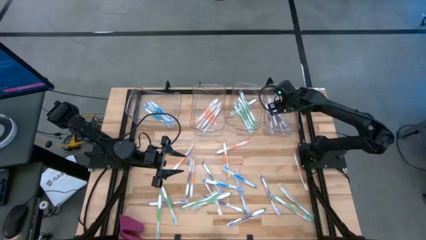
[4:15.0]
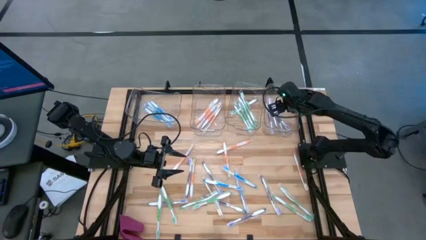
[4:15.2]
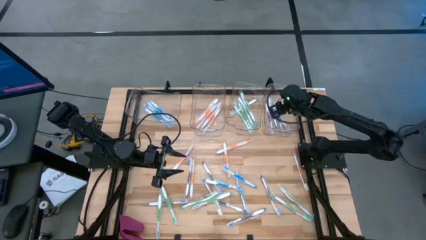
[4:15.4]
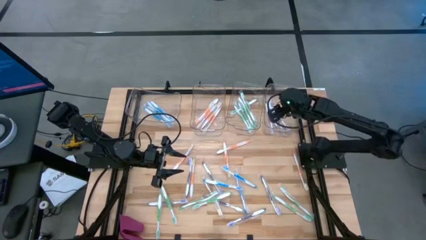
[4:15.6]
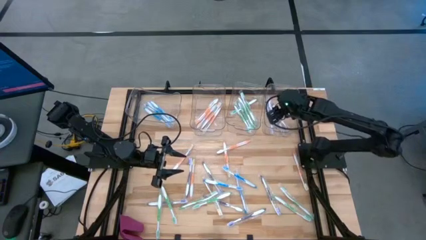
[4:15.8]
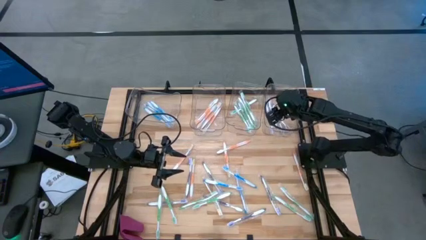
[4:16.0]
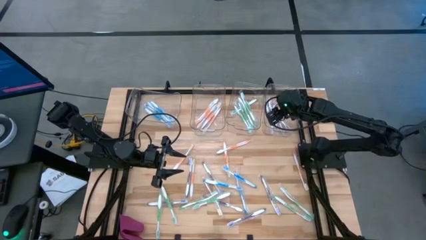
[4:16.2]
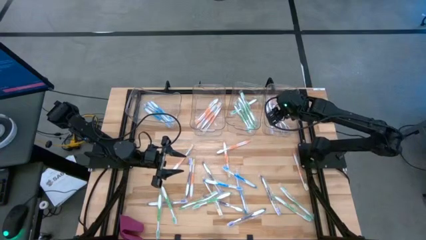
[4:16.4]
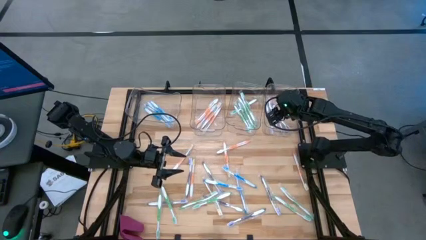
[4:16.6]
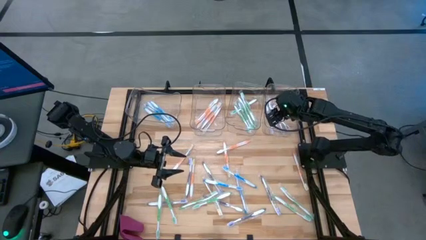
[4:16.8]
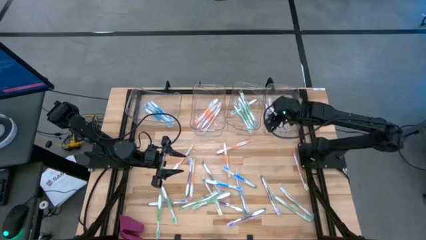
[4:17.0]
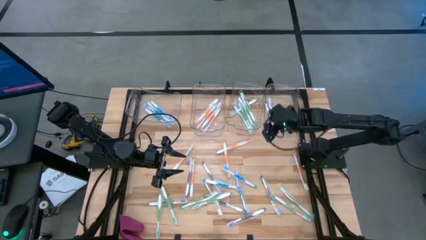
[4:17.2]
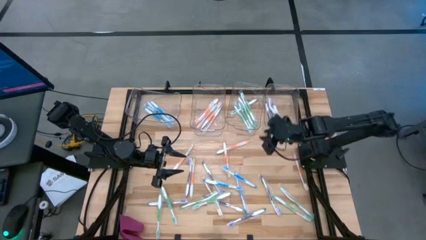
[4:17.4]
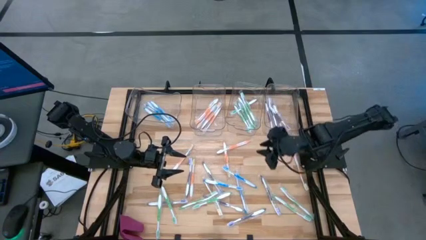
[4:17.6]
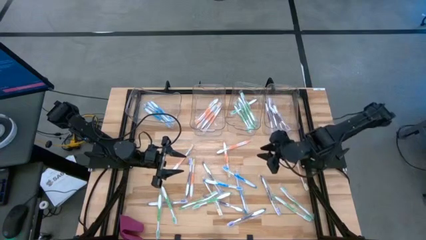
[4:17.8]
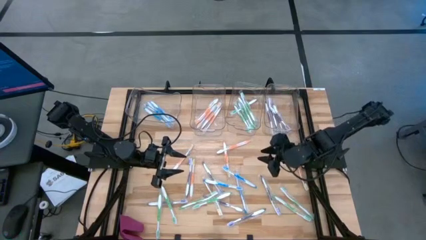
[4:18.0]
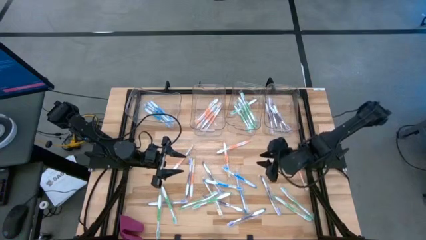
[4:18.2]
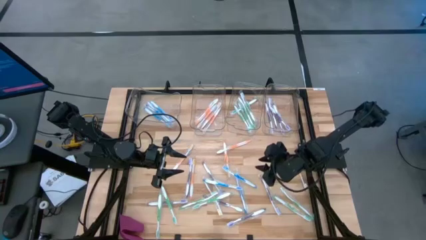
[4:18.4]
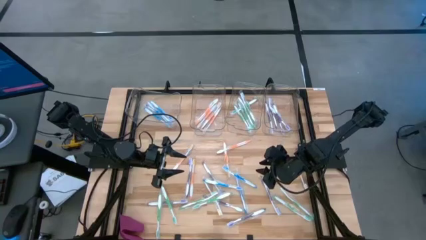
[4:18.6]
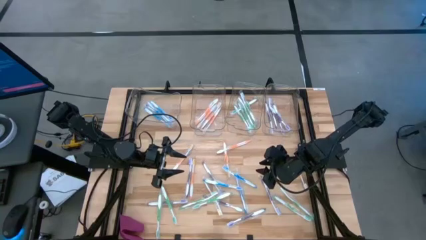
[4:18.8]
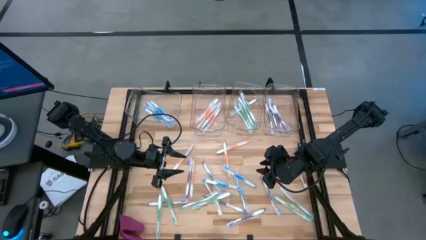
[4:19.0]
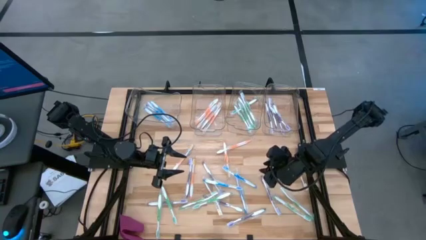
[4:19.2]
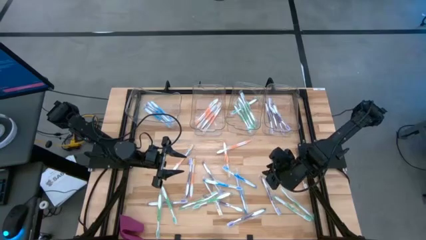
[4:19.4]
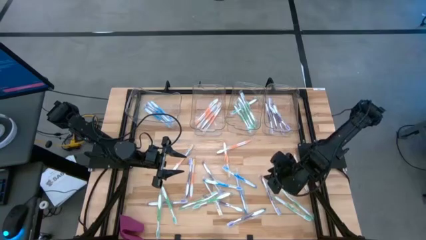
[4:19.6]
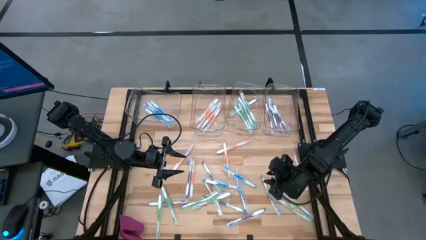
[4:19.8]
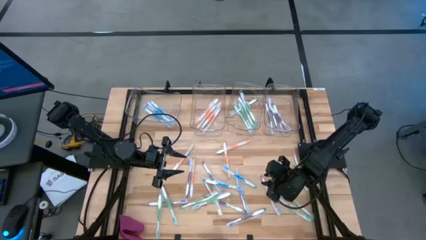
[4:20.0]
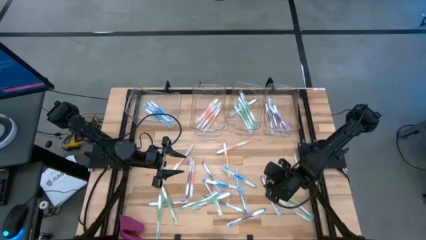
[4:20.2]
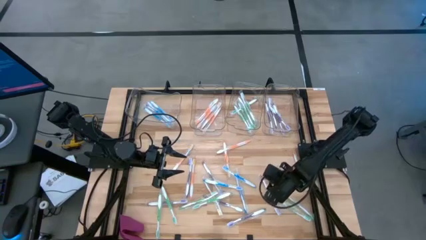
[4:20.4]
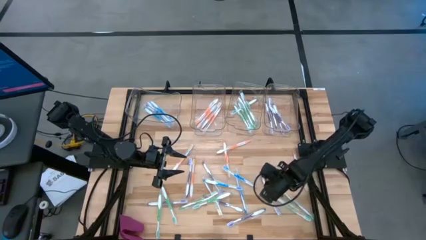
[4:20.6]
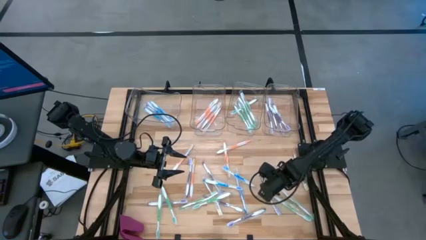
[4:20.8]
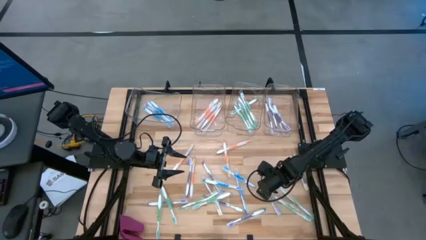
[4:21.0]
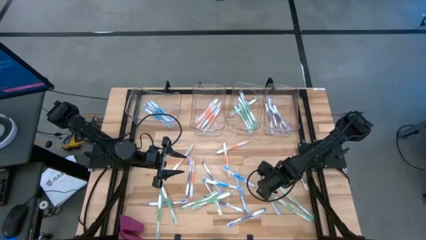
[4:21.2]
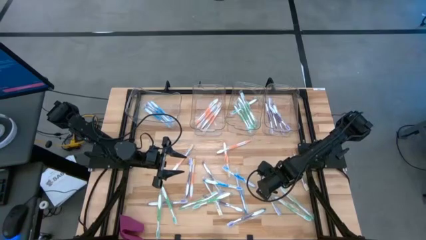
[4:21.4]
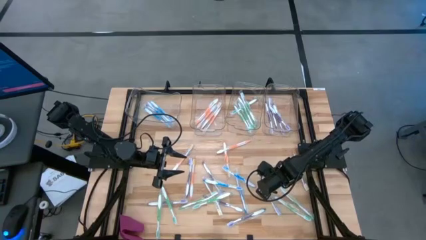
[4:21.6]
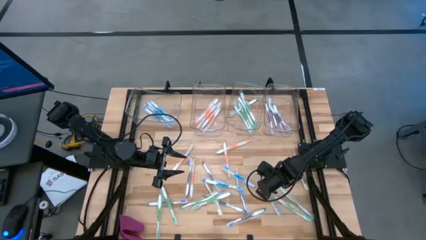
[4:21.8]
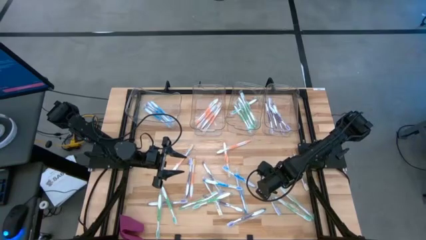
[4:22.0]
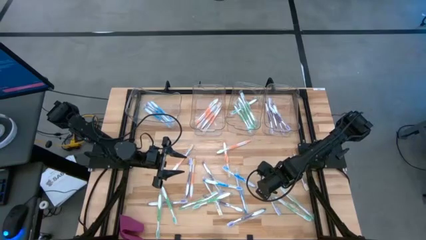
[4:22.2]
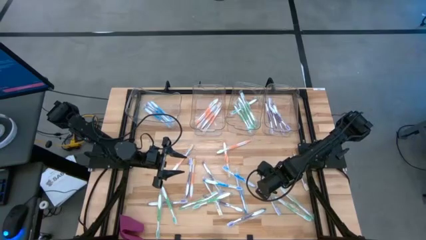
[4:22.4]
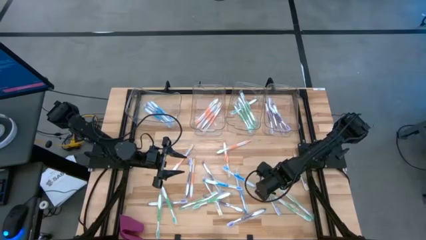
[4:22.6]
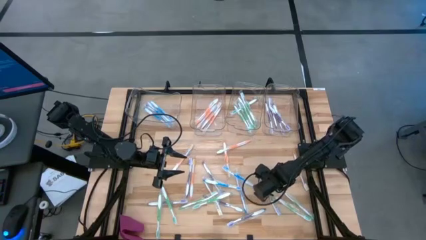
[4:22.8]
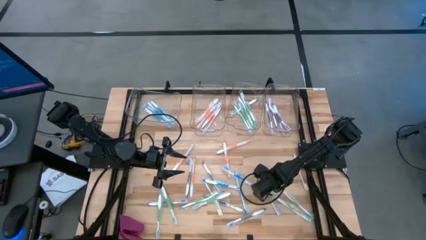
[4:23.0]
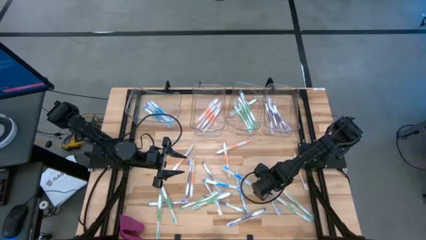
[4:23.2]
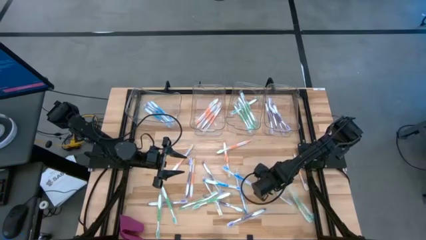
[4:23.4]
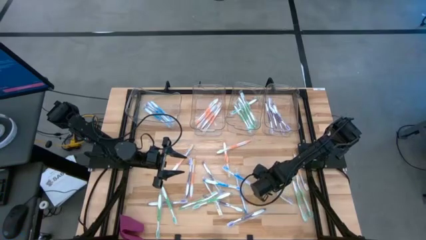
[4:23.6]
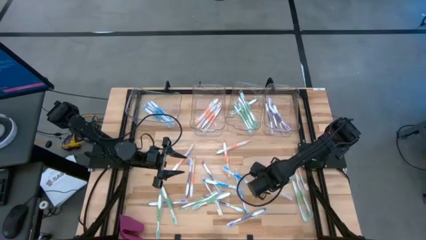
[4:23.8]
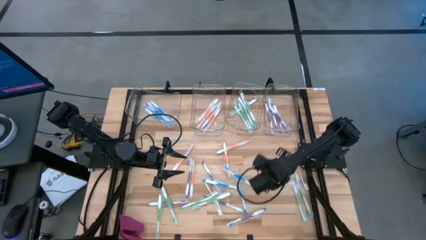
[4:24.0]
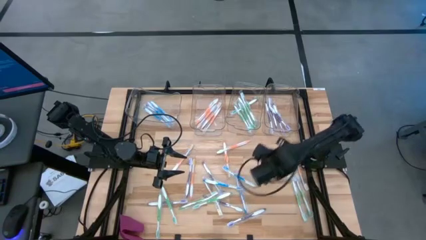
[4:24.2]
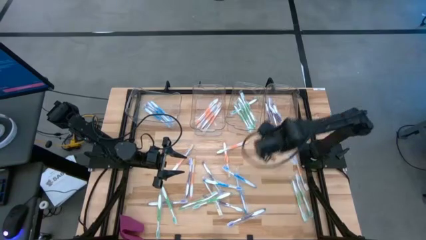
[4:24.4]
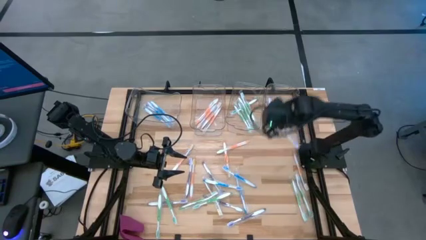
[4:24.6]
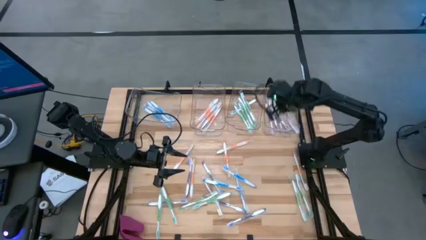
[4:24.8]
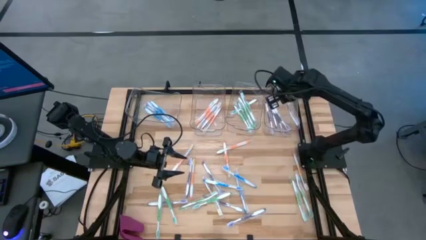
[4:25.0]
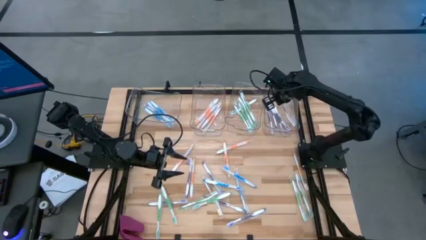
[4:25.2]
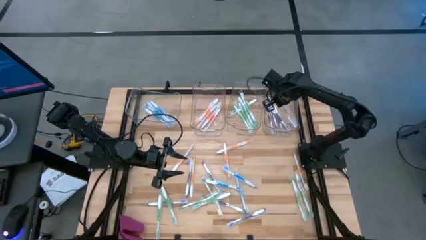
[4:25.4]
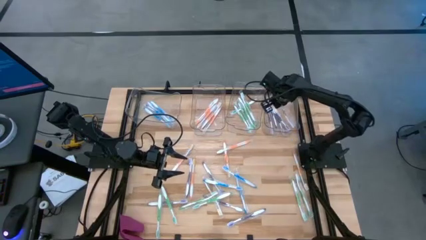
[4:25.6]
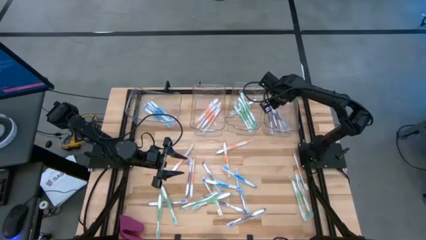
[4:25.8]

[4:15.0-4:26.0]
Task: Pick & Place Toothbrushes
Put the violet toothbrush into the right transparent bin

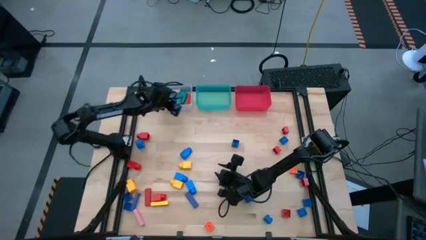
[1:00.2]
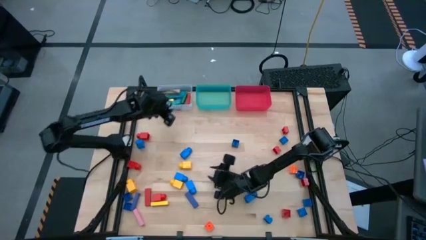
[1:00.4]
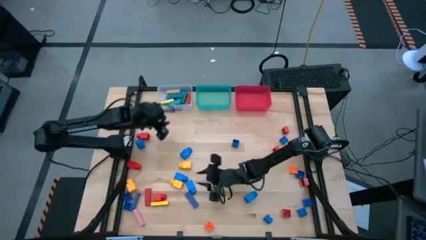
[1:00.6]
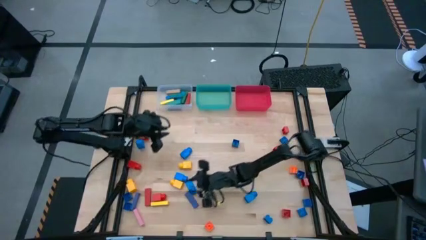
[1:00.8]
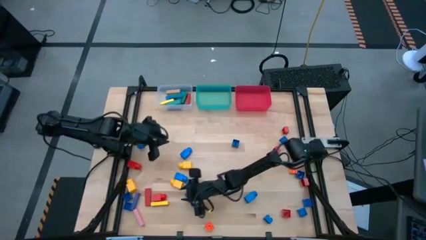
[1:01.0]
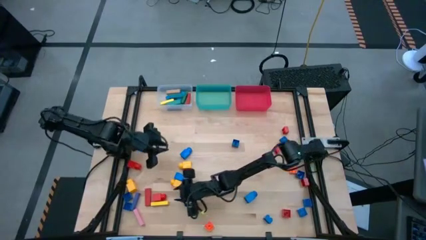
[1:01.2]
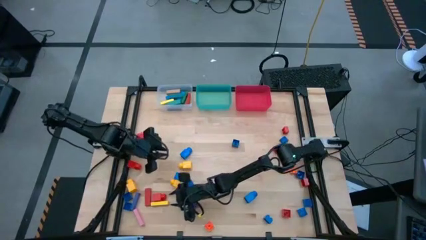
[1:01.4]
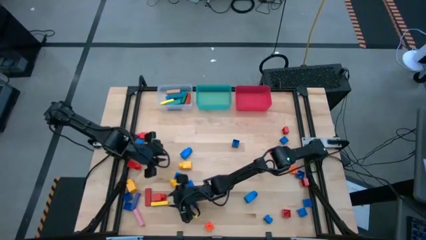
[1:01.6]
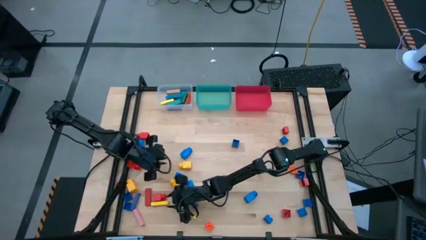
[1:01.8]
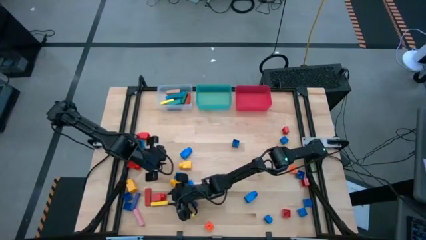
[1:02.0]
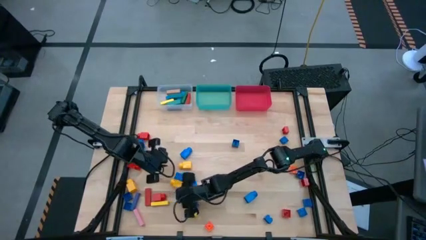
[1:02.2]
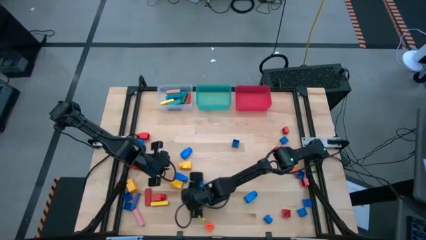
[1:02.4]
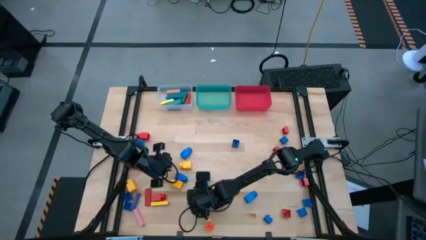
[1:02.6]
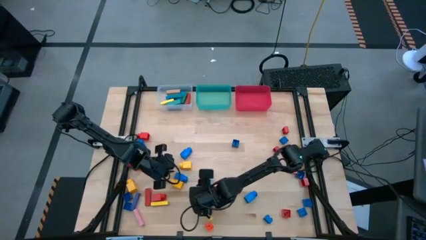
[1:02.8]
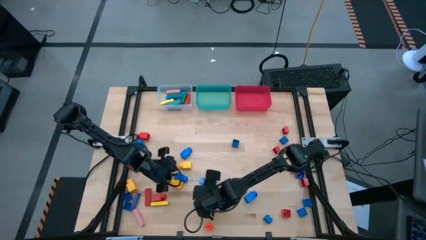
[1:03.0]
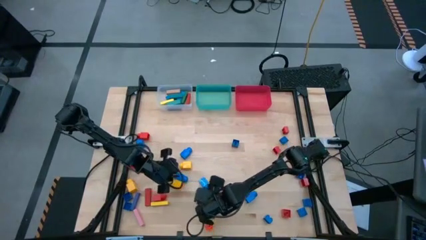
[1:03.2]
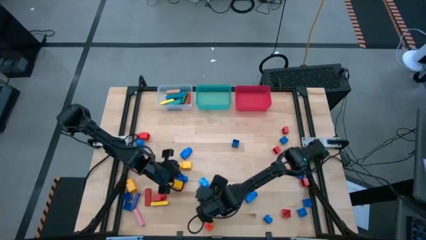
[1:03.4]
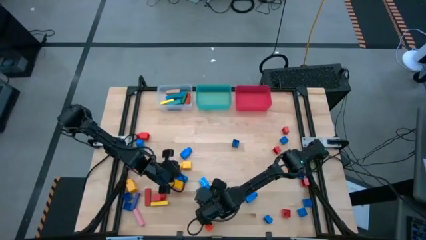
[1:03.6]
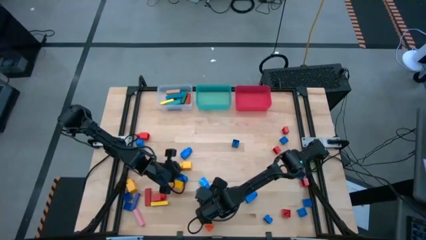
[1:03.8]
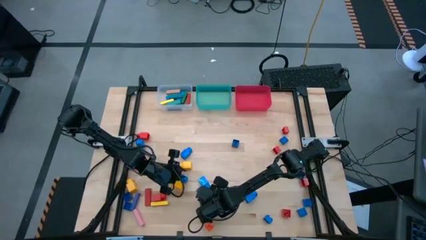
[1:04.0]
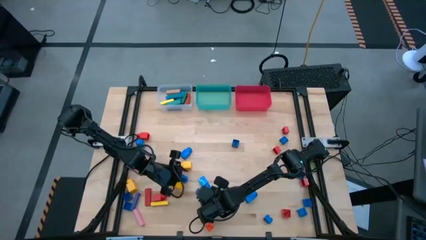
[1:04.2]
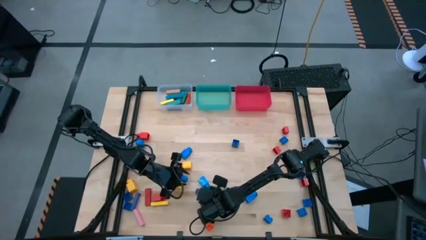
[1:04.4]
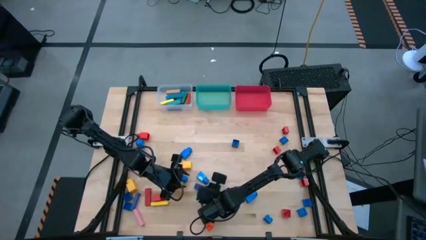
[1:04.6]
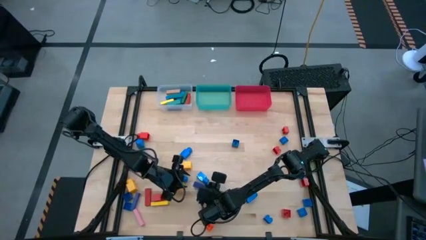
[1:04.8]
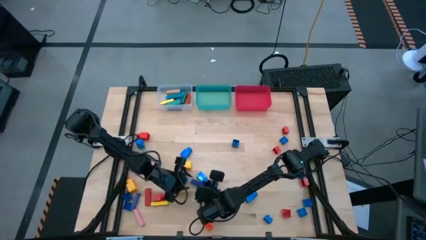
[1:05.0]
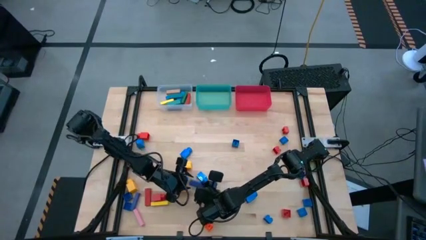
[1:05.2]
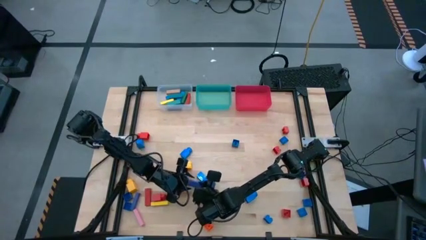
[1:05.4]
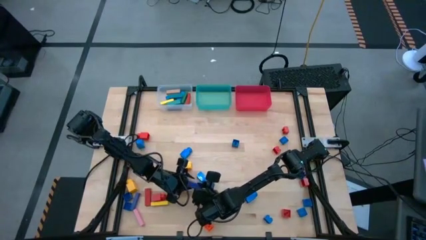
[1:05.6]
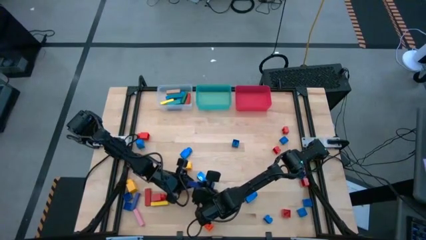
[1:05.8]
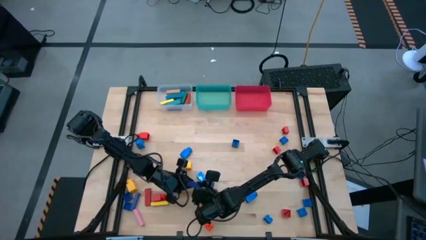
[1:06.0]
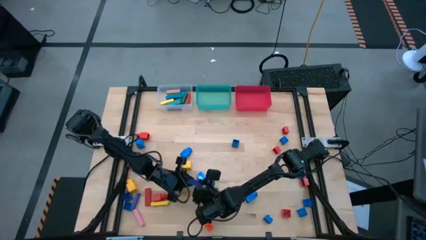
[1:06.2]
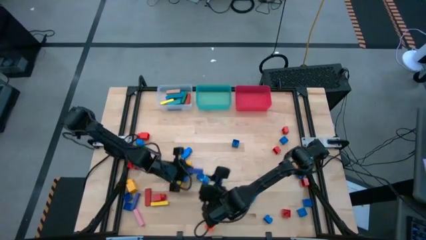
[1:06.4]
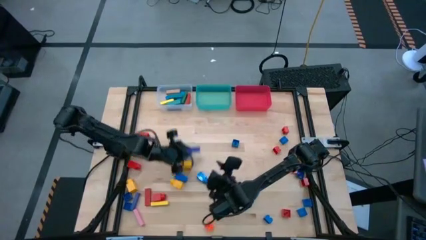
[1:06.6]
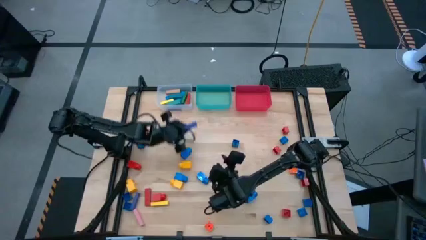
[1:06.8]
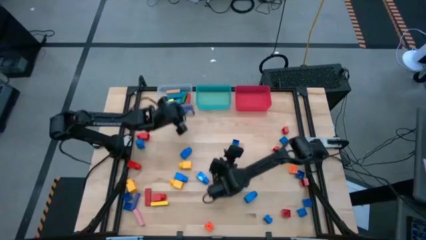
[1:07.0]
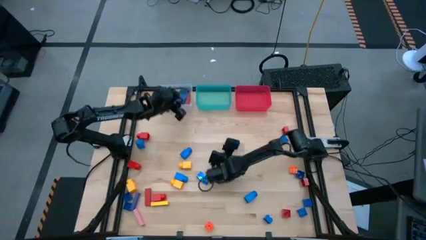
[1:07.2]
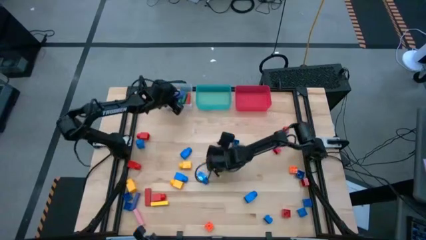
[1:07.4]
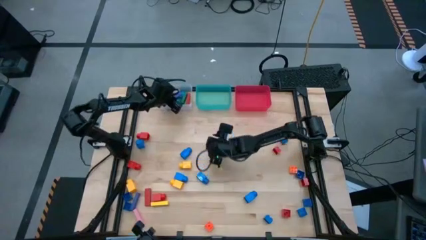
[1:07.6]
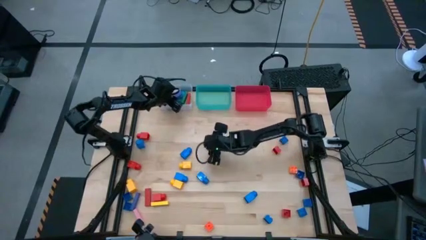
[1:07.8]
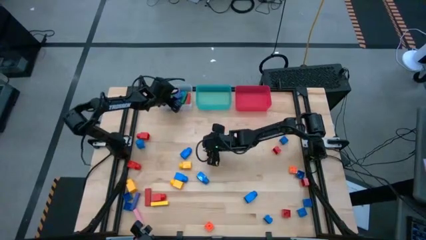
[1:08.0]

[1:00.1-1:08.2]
Task: Sort blocks by size
Put the dark blue block into the transparent bin
